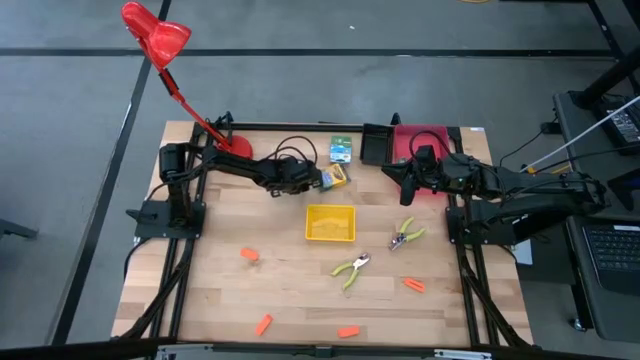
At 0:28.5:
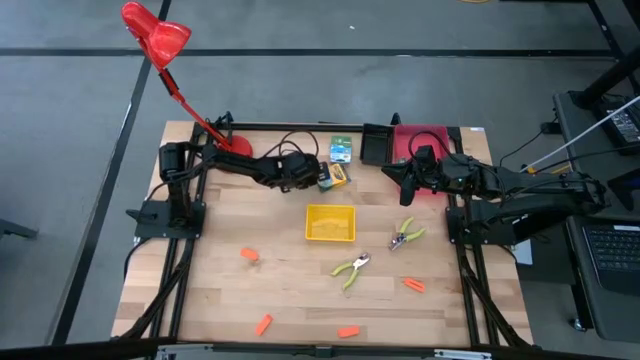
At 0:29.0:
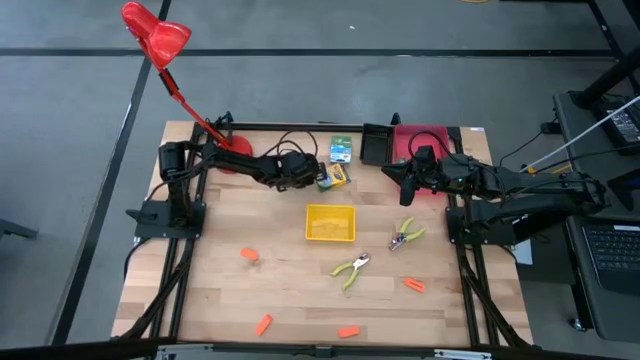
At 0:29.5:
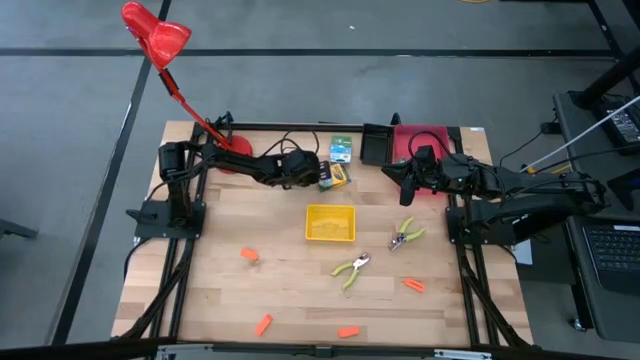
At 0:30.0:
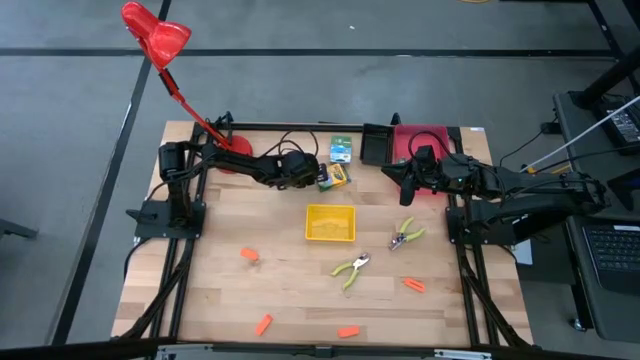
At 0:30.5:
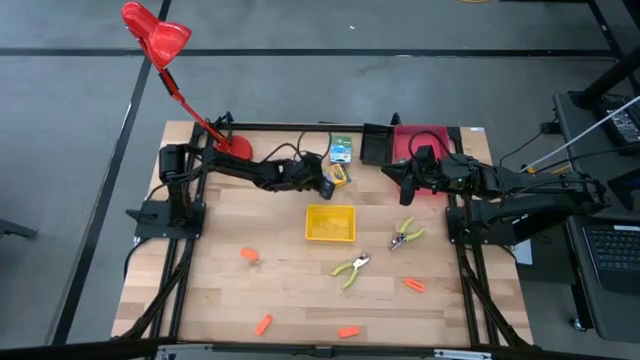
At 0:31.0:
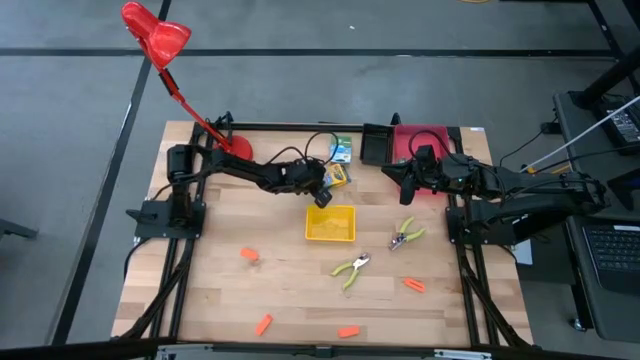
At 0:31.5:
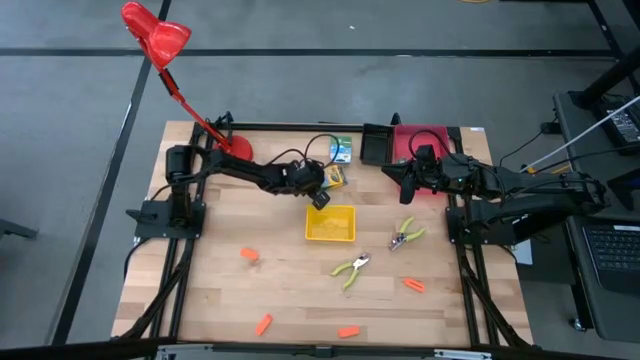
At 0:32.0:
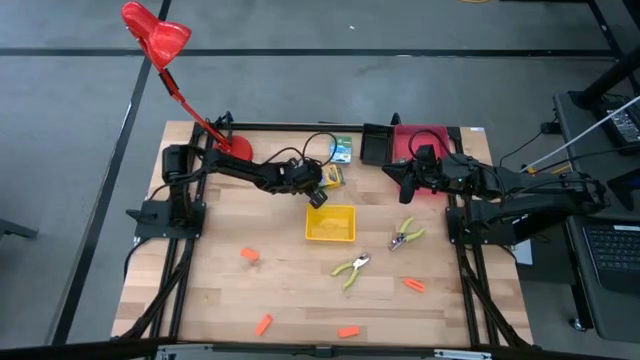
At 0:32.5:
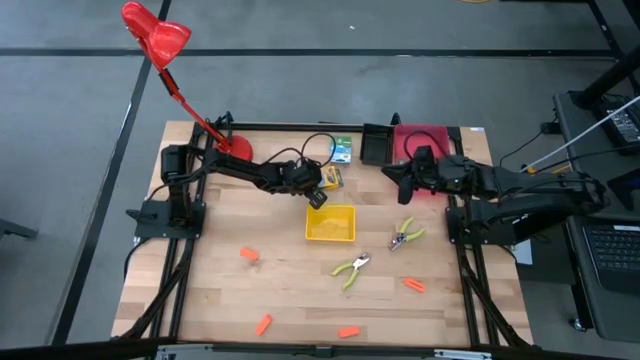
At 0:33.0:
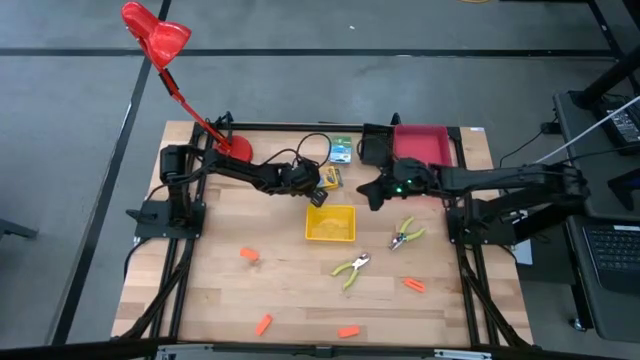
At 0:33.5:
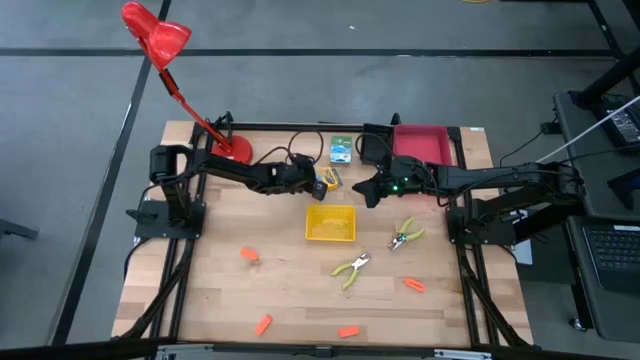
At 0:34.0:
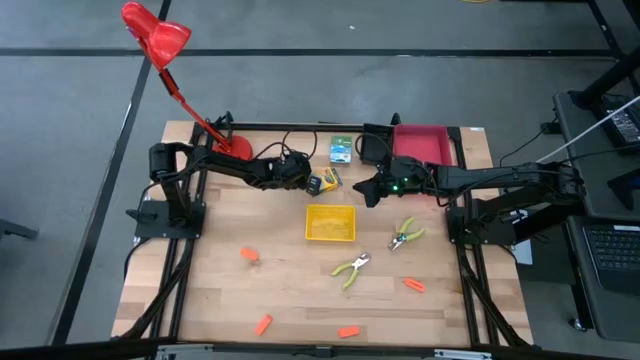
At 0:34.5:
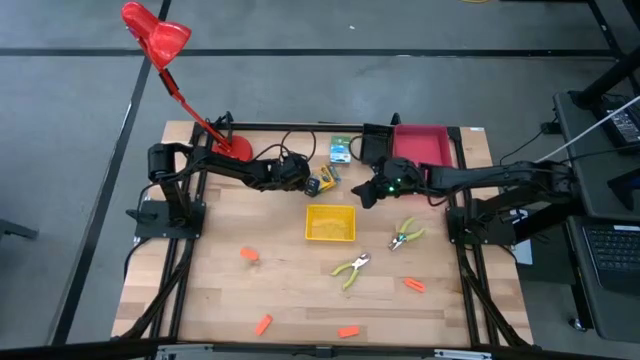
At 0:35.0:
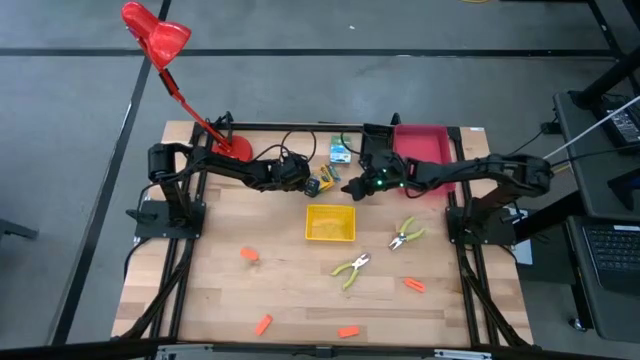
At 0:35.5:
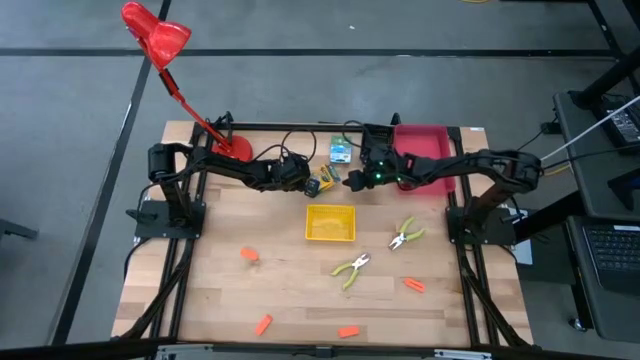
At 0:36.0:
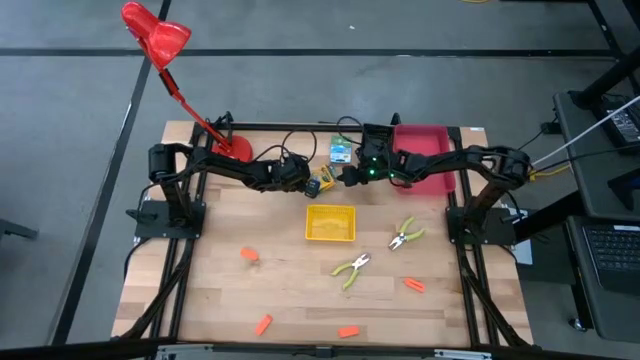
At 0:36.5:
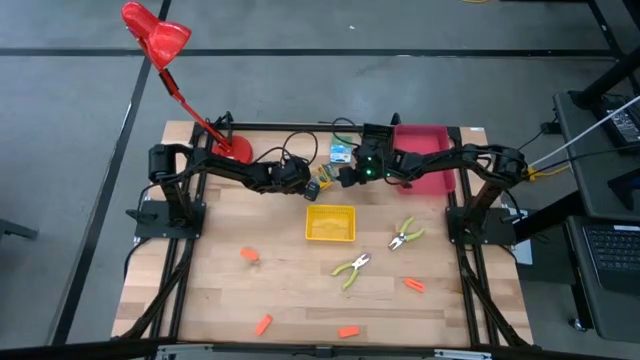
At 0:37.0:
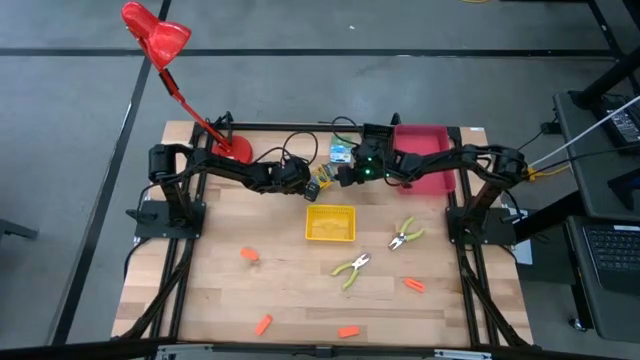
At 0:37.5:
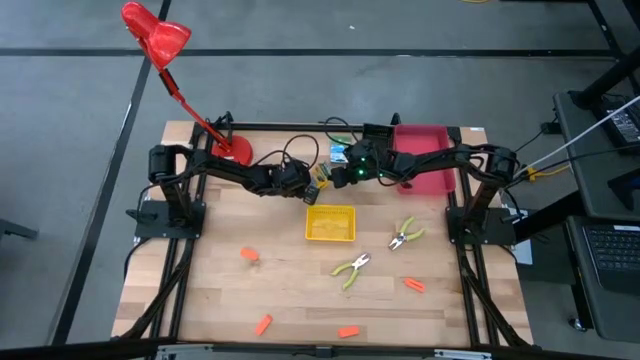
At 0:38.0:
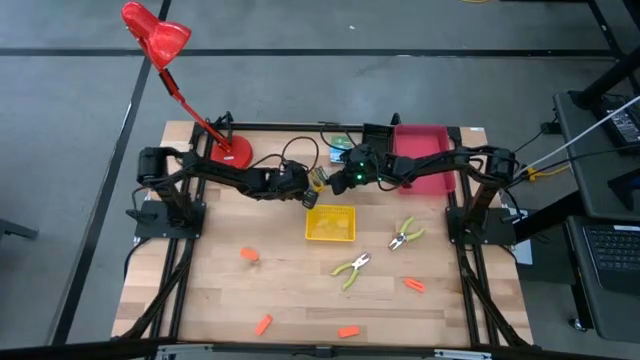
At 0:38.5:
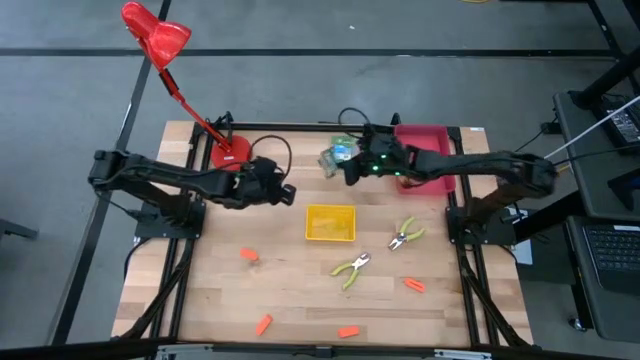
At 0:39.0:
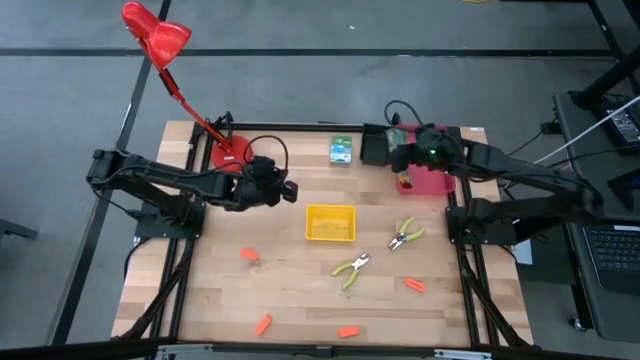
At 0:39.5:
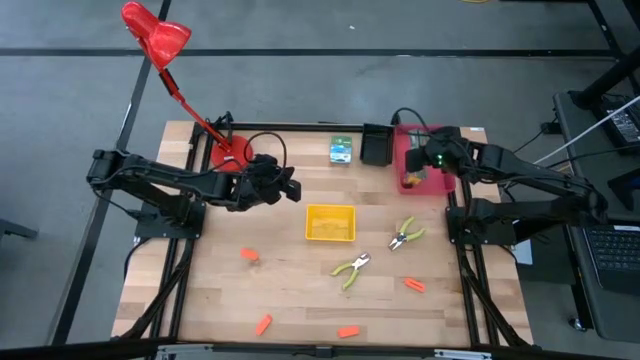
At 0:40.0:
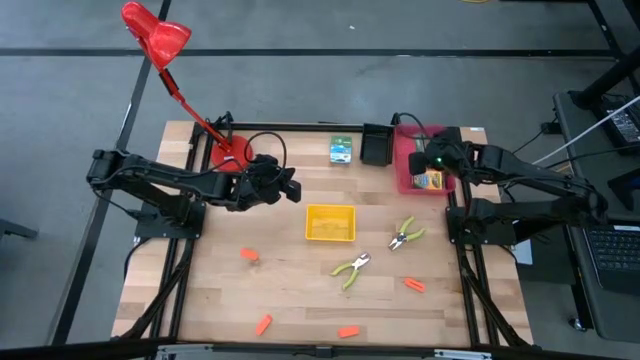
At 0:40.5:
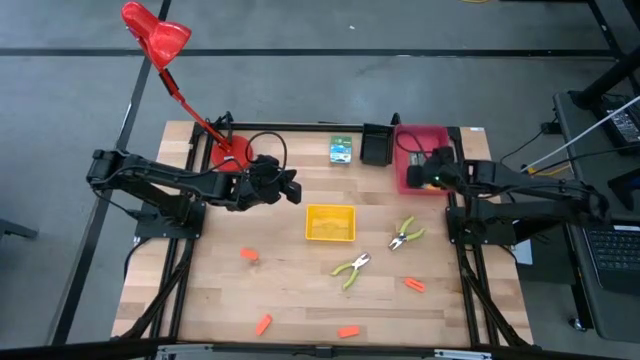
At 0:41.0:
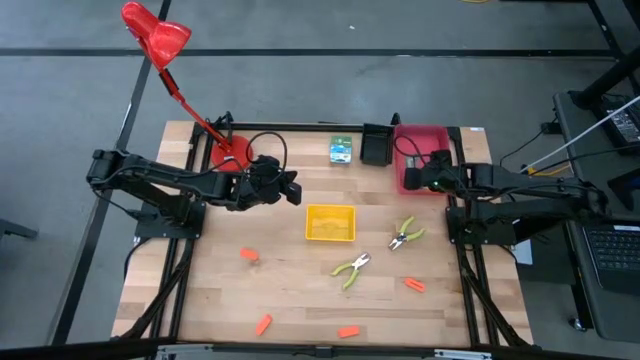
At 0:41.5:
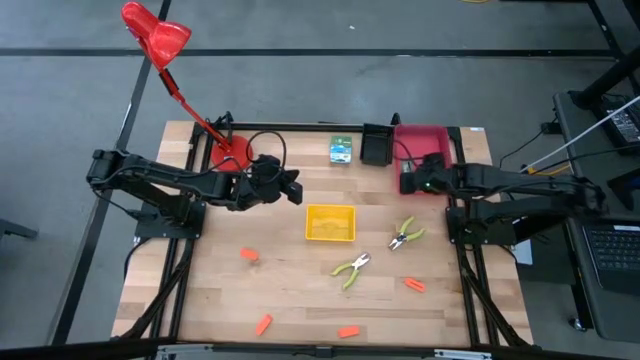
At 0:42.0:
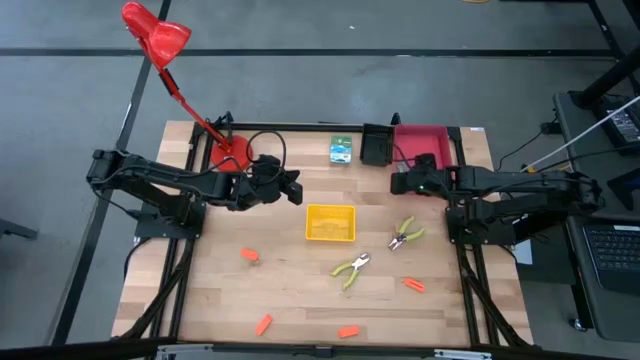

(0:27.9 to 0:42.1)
Task: Pick & Place School Supplies
Put the bottom yellow crayon box into the red bin

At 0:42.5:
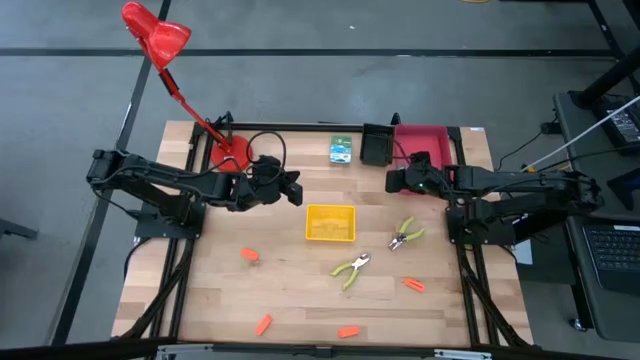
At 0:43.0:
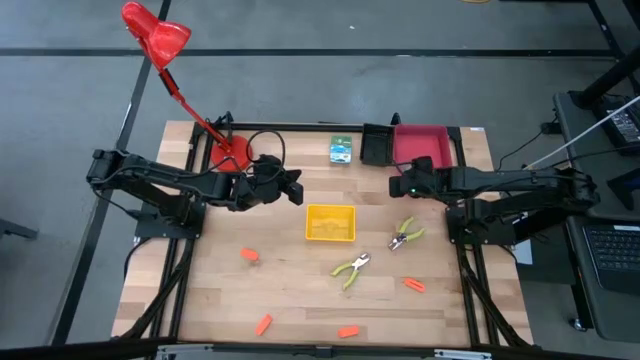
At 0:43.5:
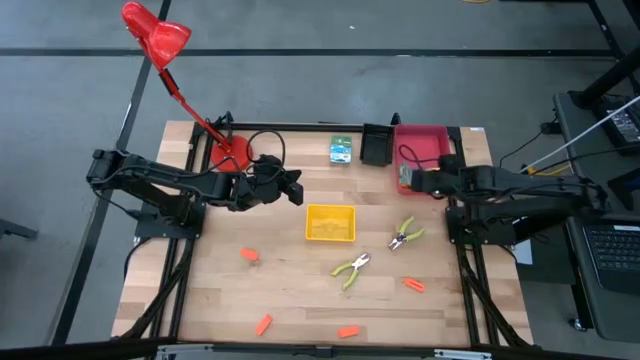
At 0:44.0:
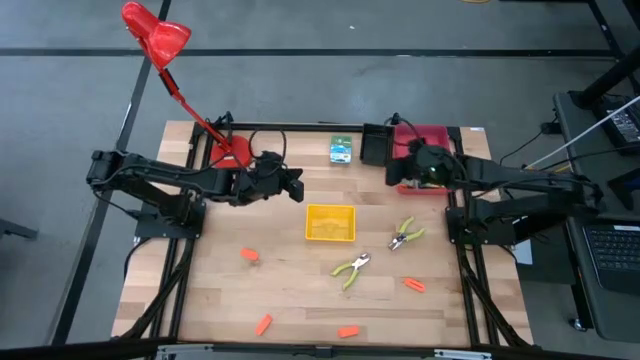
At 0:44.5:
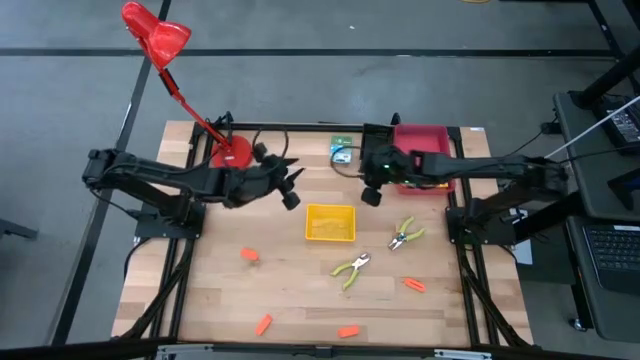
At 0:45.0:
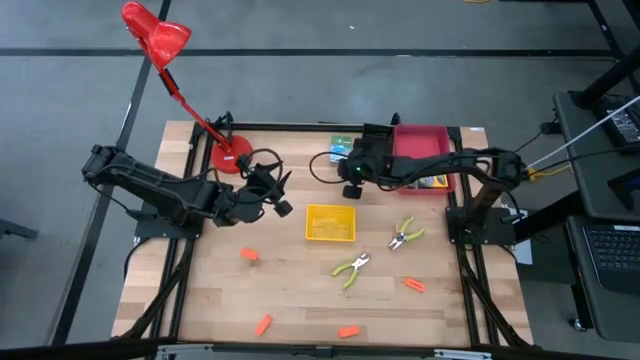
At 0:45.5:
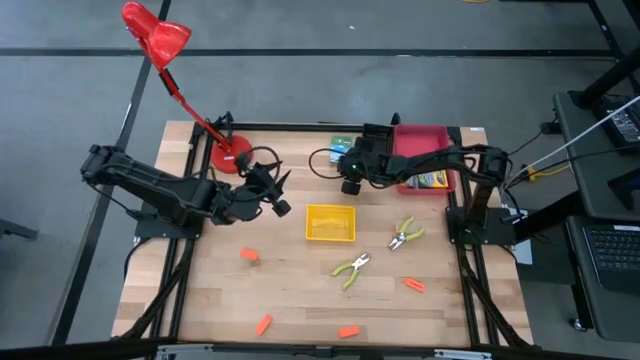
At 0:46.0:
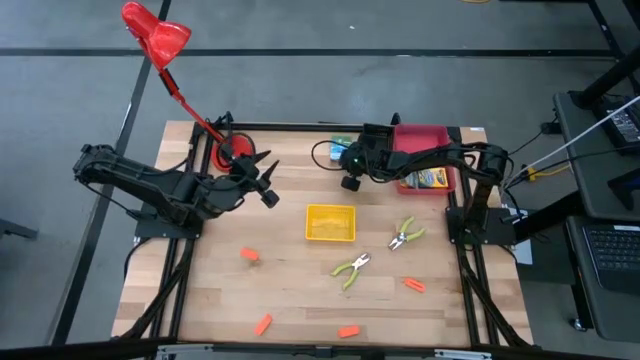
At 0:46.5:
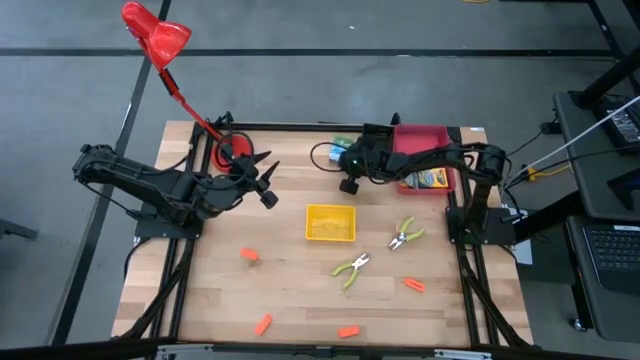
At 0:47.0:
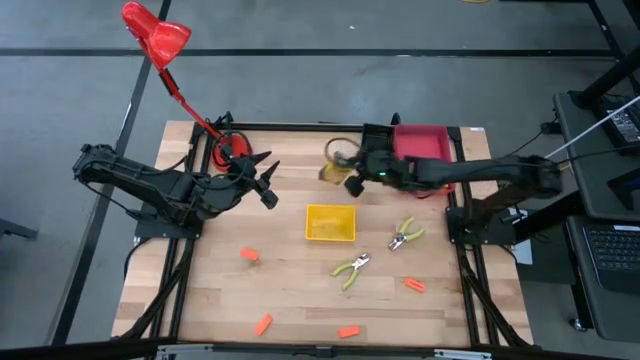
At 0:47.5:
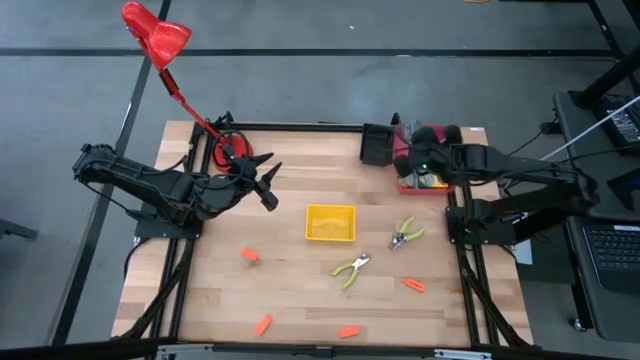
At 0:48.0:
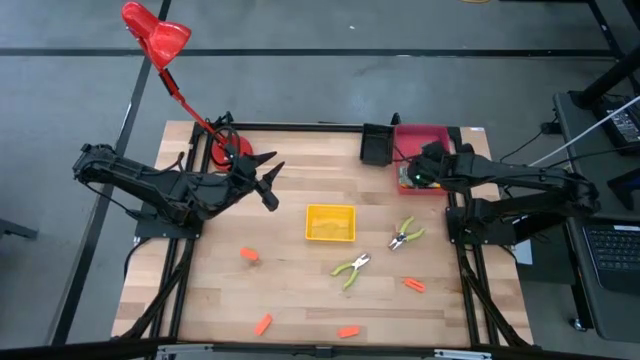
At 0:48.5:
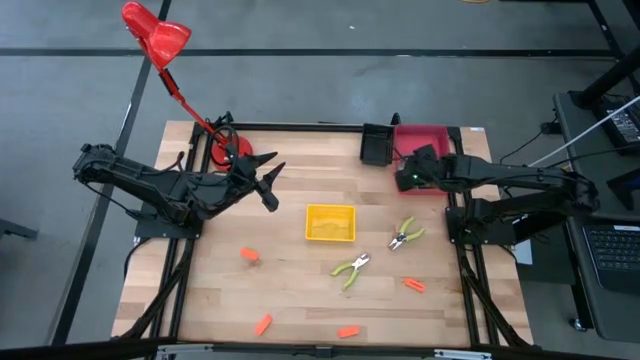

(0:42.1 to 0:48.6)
Put the yellow crayon box into the red bin

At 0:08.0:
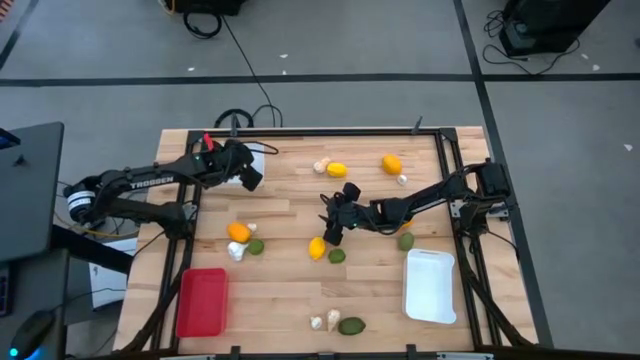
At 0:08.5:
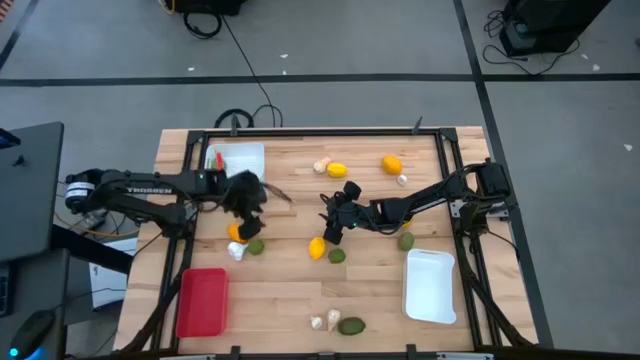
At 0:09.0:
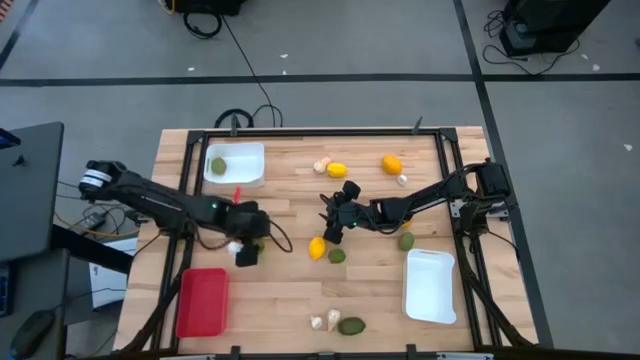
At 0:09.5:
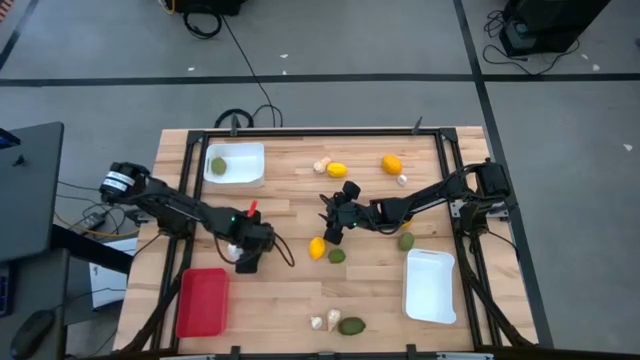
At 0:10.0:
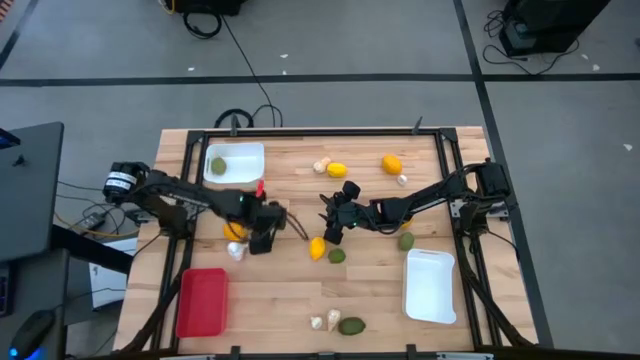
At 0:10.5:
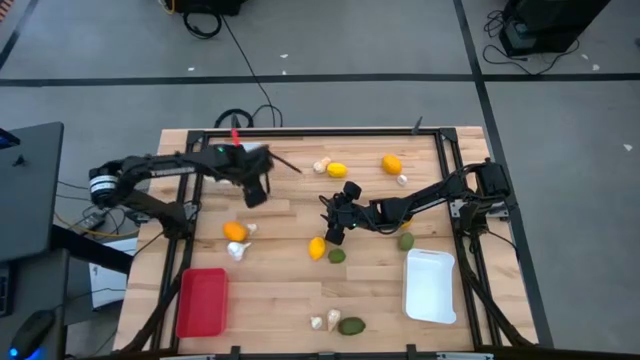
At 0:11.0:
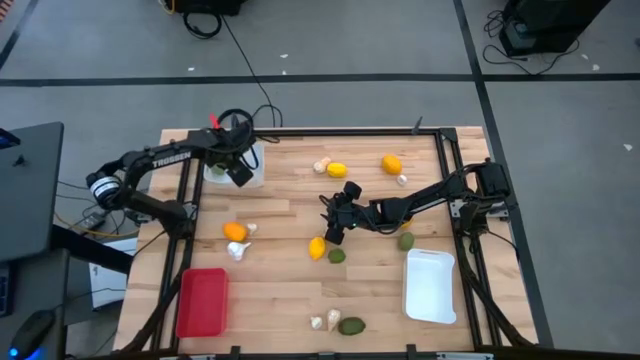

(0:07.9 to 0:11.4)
Task: Sort produce into baskets
Put the top left green lime into the top white bin
